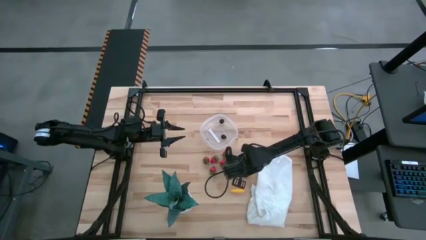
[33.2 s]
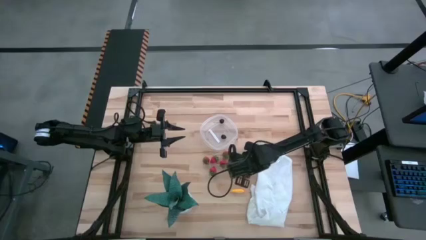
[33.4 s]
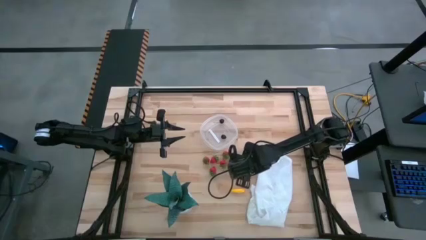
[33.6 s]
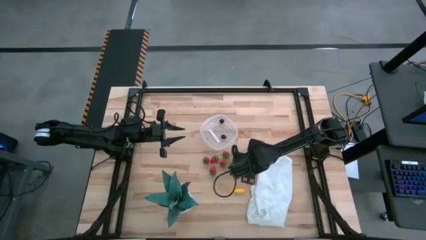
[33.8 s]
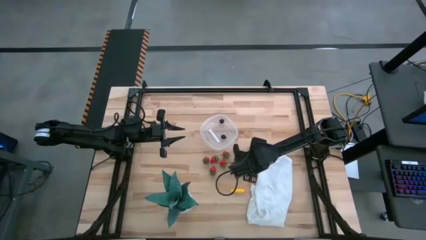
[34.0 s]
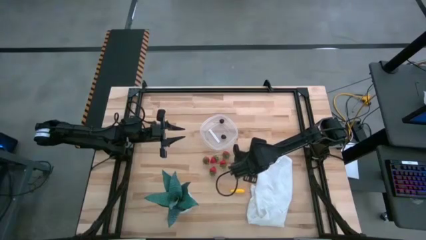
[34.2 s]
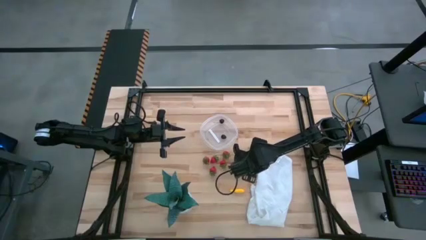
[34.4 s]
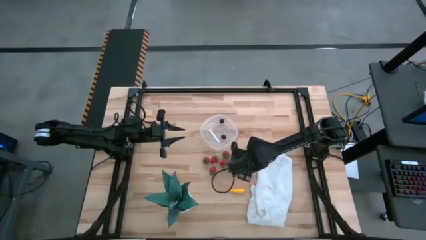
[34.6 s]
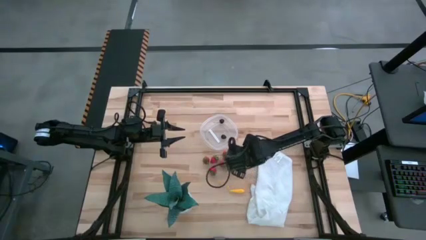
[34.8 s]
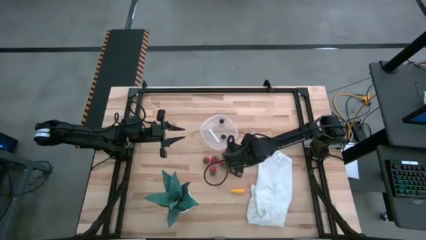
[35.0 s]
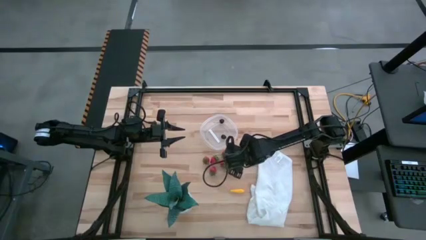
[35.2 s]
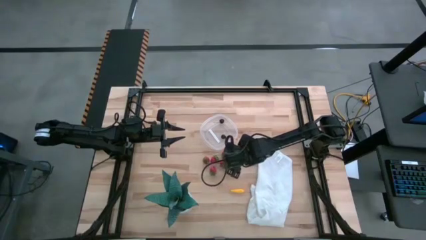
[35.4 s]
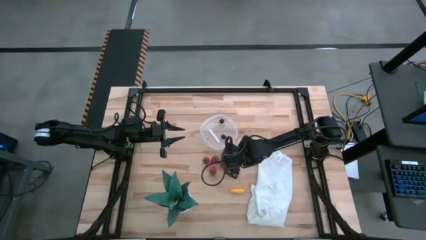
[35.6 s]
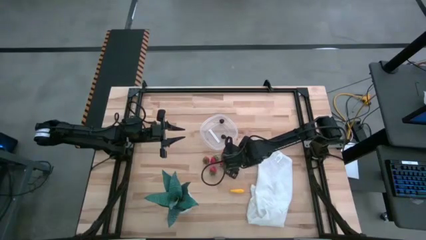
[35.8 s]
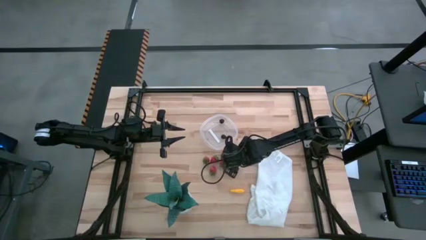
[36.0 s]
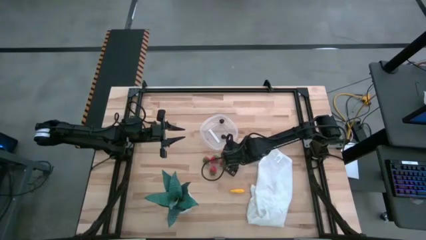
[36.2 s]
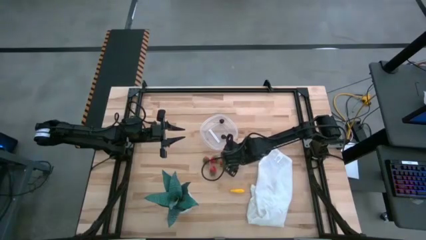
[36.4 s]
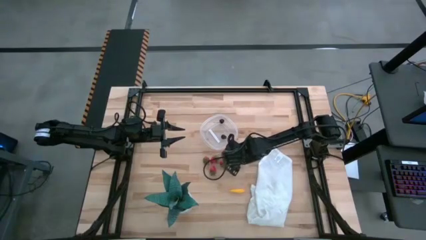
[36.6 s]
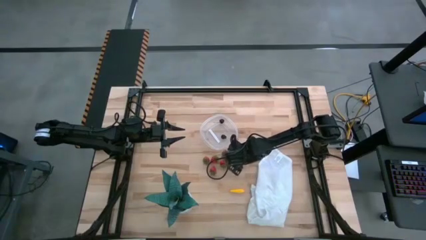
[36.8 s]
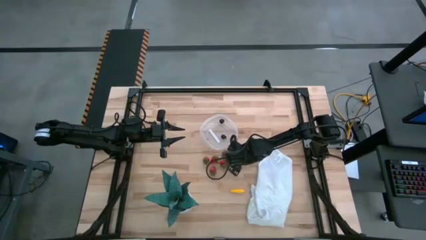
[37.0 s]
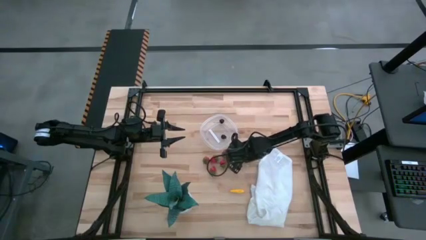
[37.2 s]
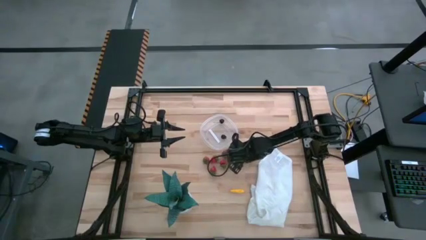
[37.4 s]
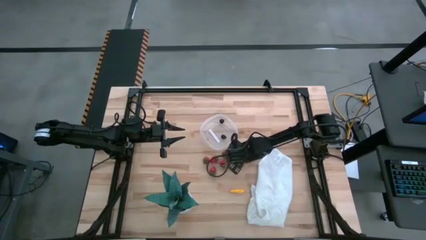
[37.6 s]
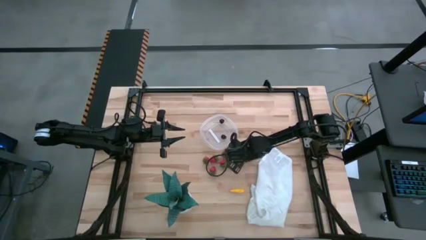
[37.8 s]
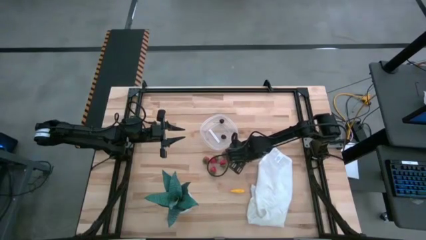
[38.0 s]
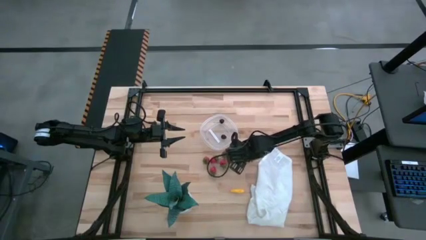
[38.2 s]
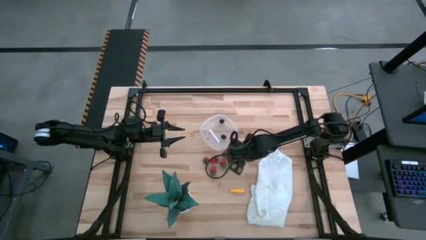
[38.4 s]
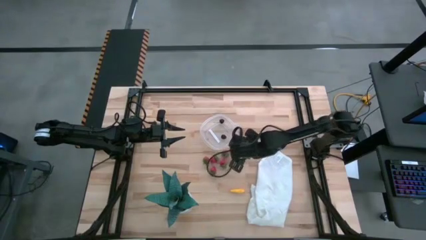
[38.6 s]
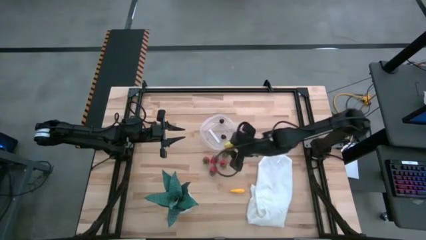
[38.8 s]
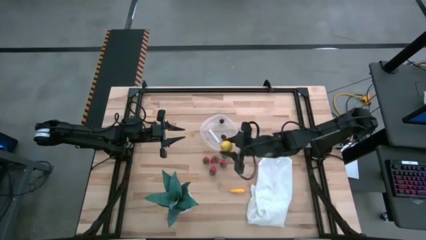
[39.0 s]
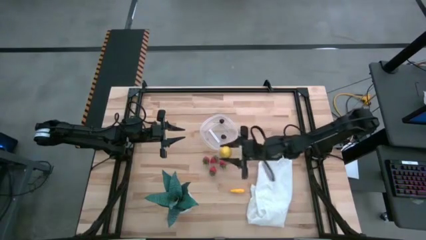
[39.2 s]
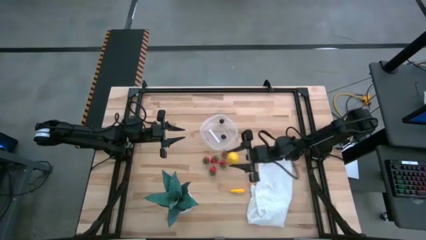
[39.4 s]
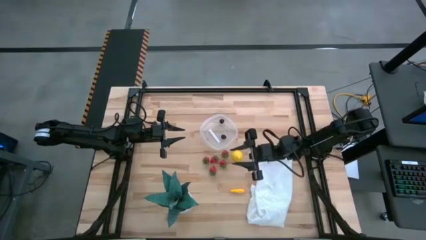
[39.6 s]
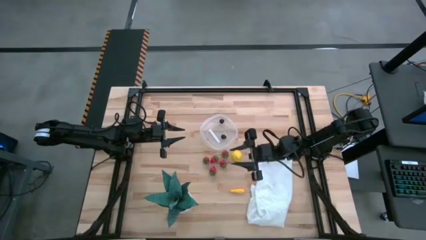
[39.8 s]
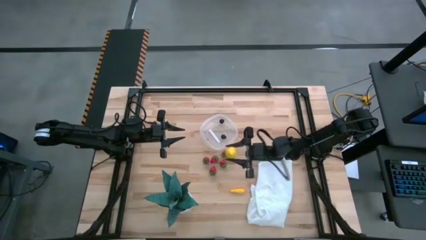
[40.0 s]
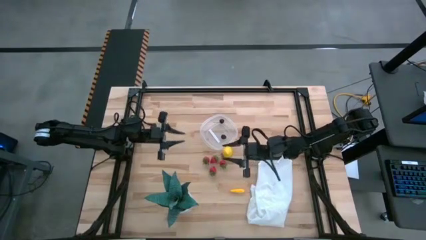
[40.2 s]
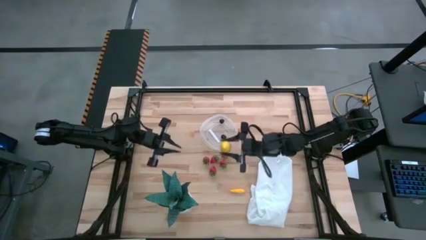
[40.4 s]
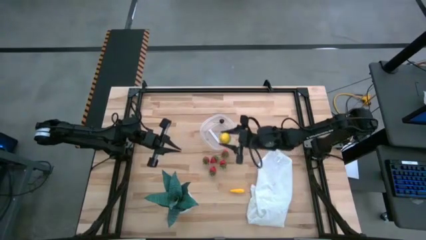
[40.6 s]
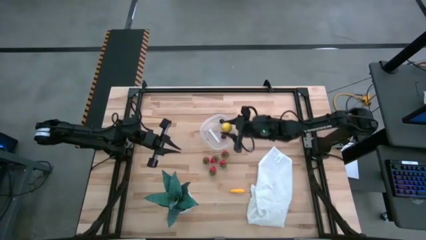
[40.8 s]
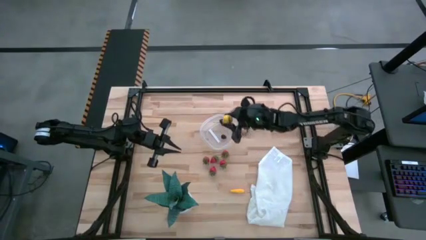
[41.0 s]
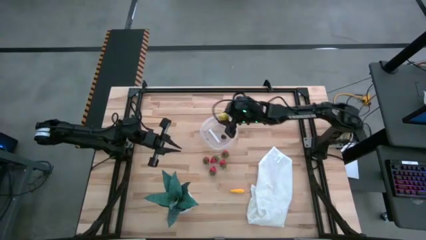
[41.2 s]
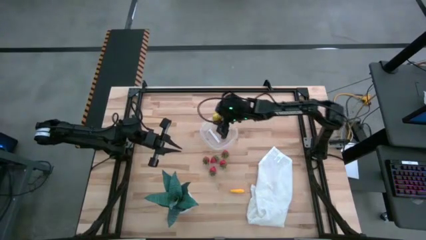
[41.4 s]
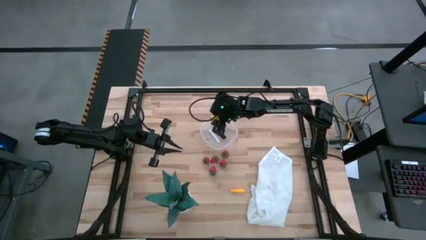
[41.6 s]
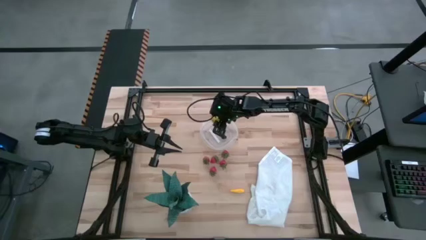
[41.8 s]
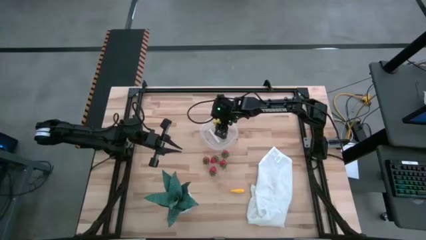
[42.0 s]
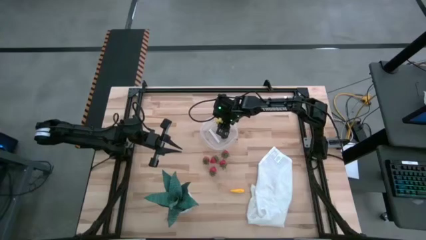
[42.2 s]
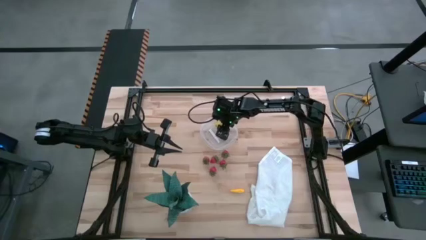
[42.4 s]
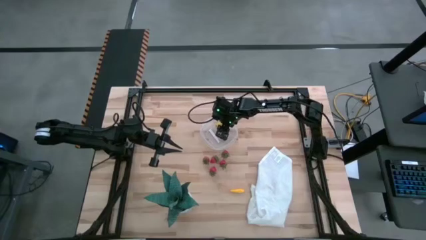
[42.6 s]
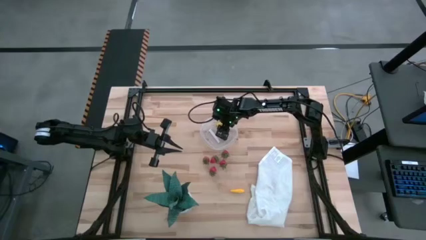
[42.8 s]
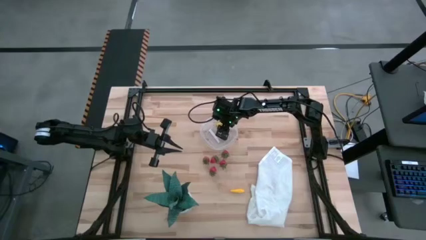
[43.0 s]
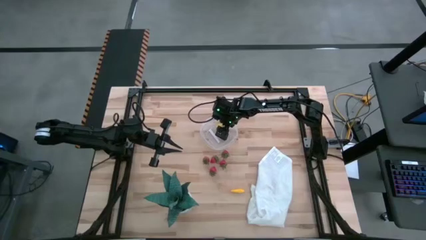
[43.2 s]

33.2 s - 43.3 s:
Task: Pick and placing Produce into tupperware
Put the lemon into the bin

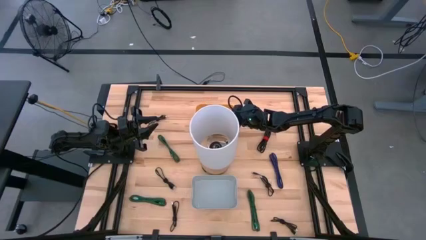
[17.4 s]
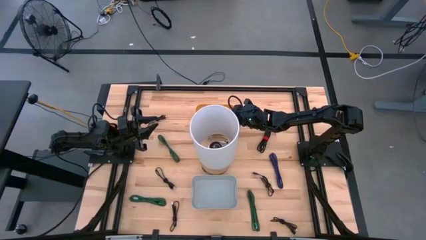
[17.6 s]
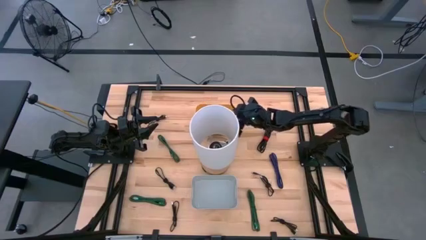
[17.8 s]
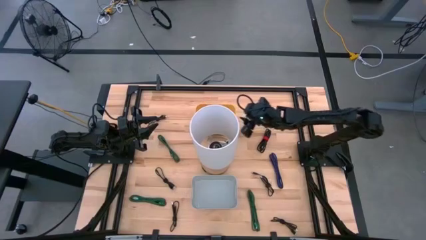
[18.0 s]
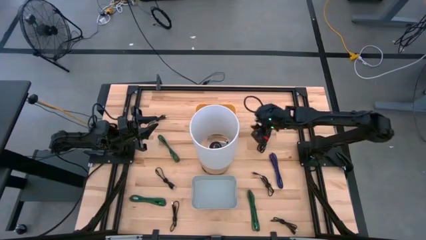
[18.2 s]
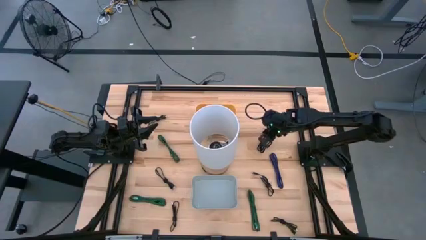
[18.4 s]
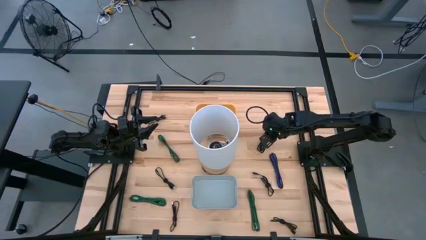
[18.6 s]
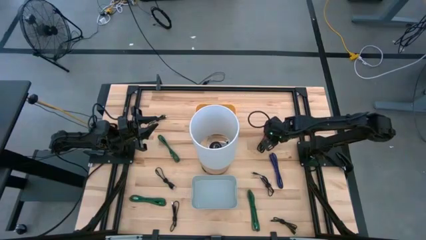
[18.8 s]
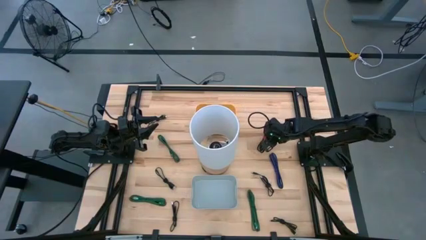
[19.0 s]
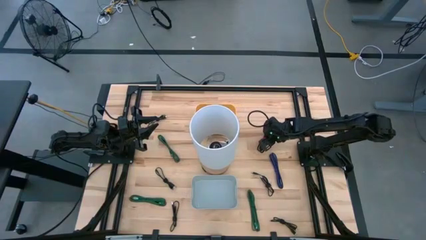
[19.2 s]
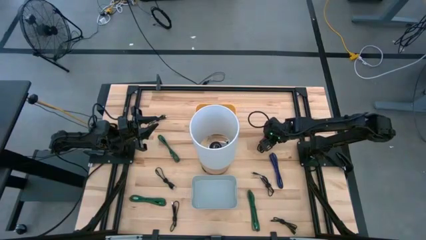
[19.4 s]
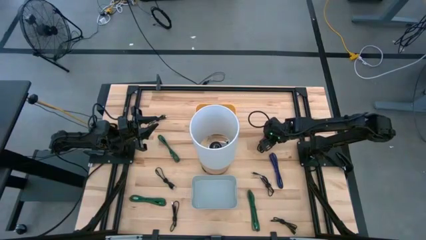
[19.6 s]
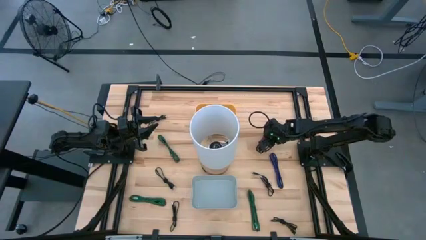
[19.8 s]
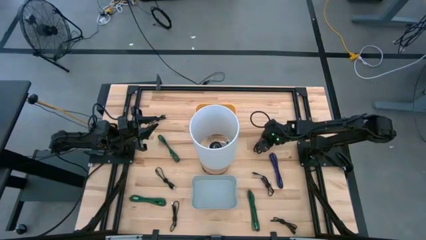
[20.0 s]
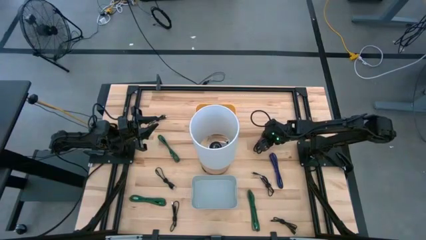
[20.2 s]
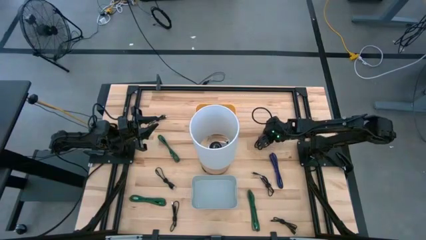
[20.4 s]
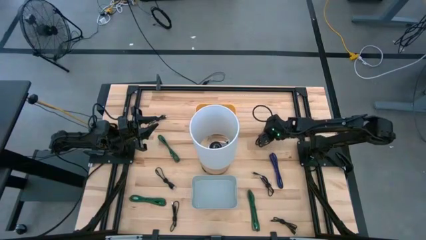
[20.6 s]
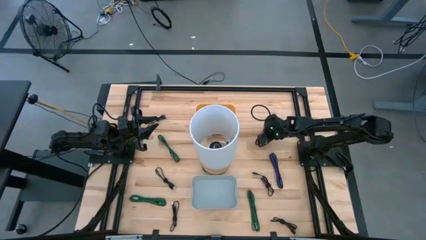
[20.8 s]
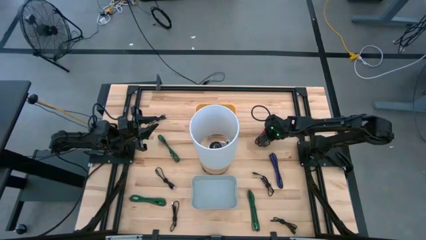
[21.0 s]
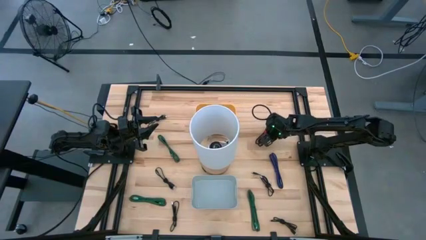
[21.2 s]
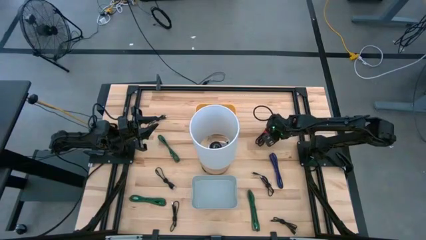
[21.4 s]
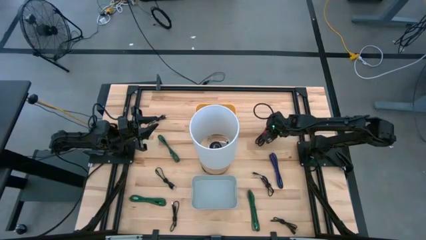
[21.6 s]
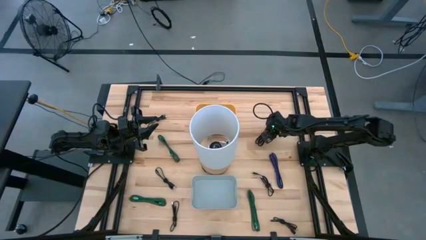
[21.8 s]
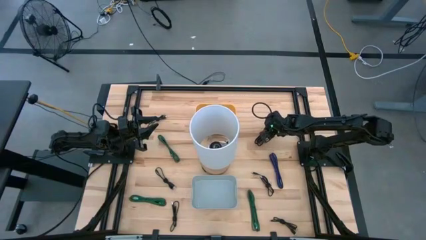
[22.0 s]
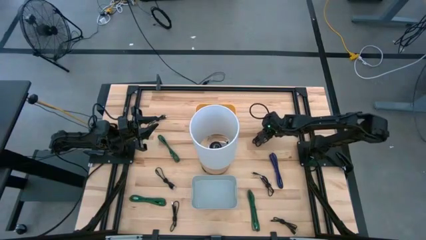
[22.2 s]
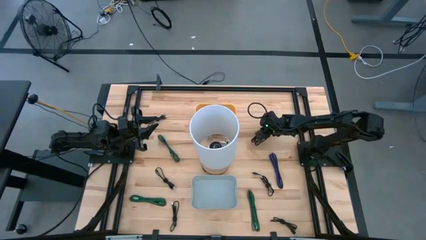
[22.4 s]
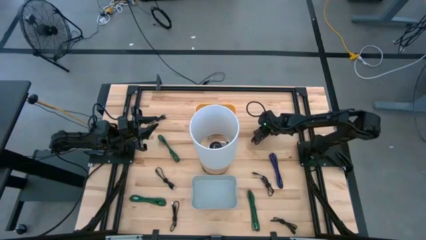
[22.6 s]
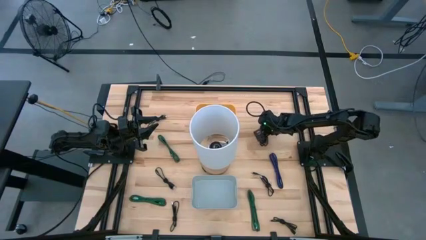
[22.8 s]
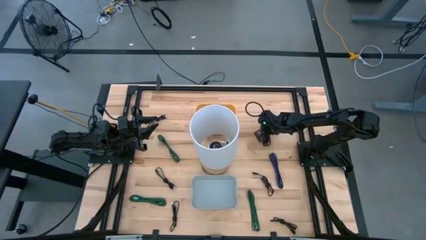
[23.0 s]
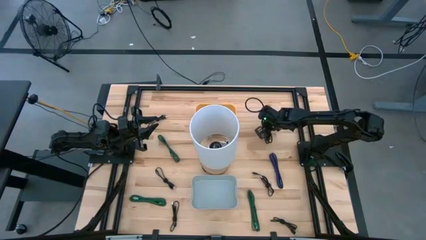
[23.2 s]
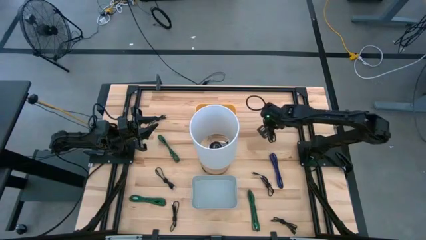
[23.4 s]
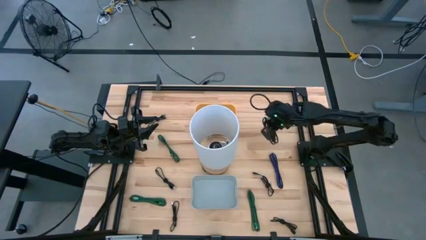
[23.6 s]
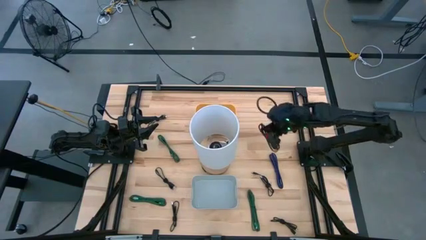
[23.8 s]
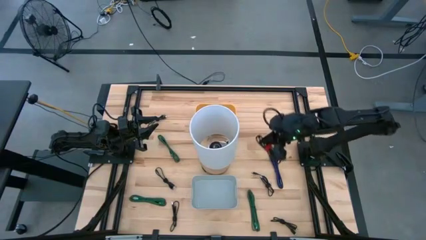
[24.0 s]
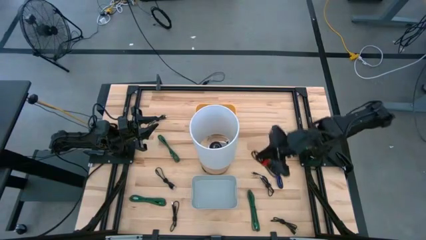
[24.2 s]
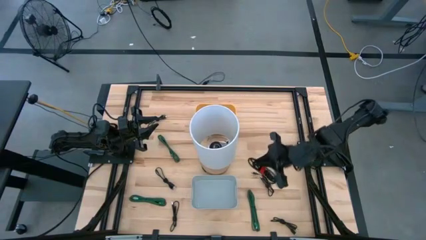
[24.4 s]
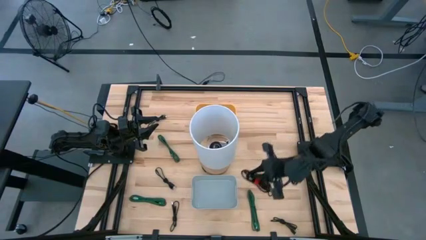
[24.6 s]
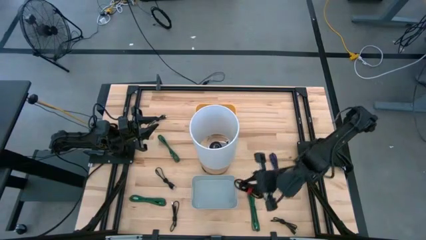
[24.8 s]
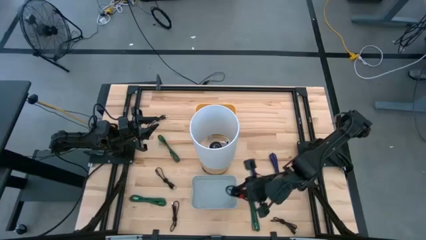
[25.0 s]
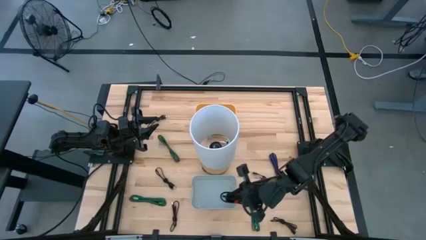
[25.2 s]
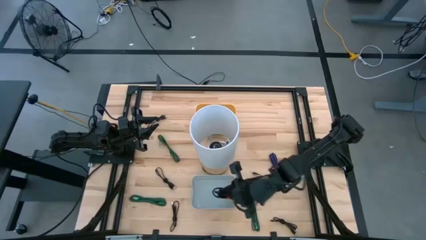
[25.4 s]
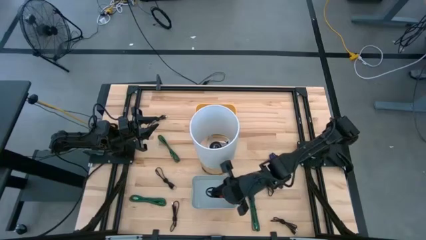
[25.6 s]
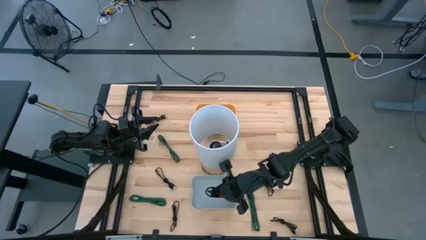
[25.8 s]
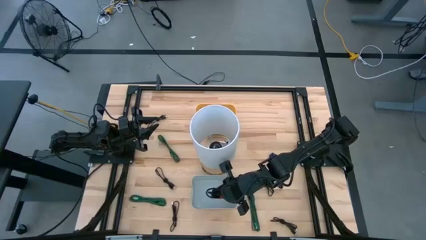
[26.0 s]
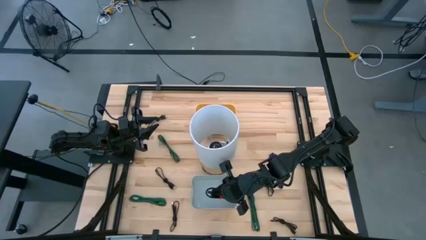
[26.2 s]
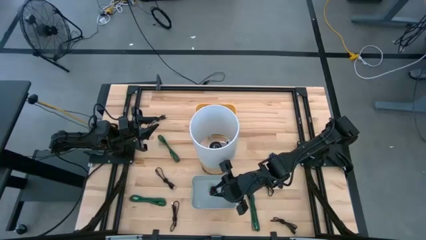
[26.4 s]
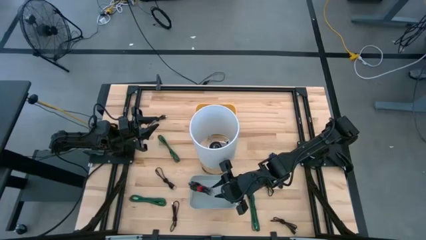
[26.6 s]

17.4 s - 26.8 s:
Task: Pick & Place USB Port
Put the black charger cable into the white bin
